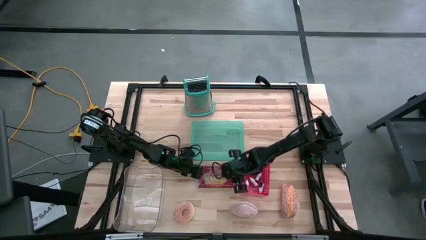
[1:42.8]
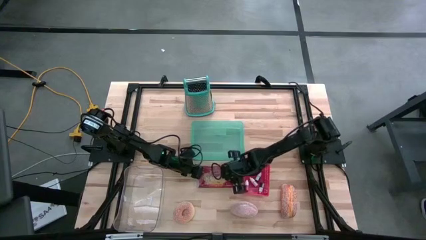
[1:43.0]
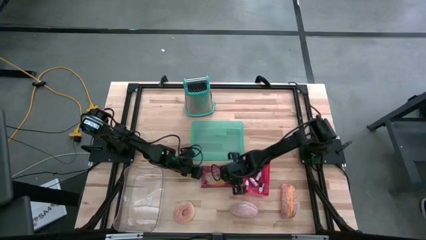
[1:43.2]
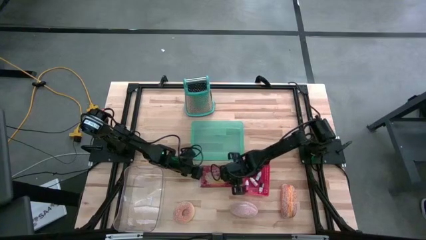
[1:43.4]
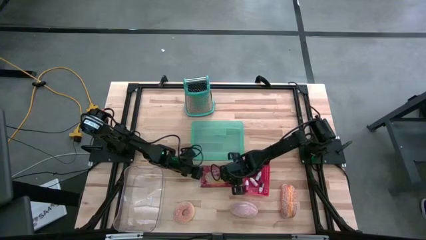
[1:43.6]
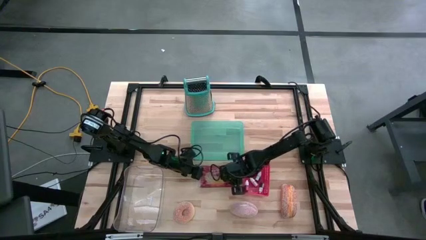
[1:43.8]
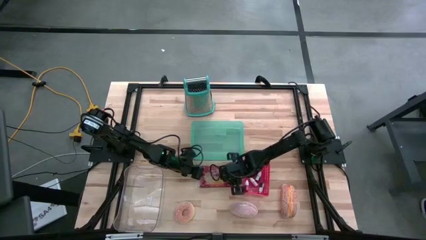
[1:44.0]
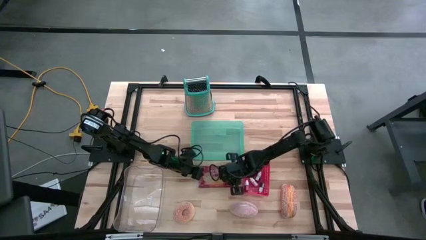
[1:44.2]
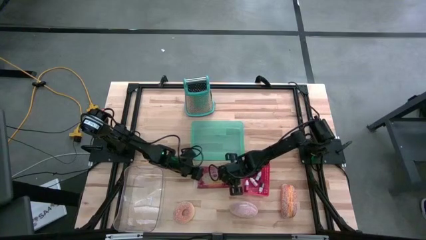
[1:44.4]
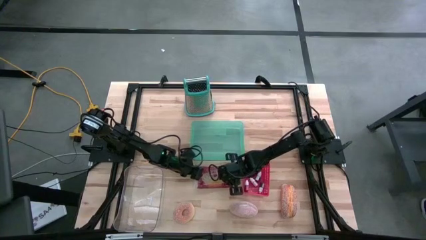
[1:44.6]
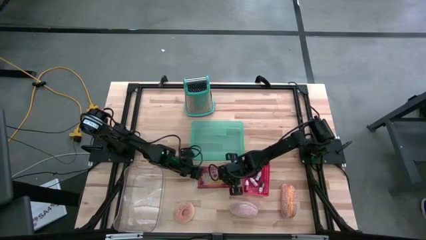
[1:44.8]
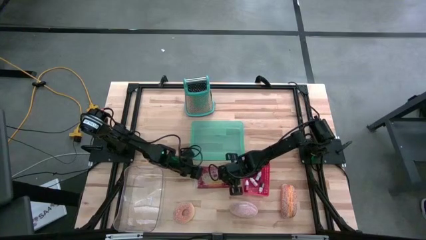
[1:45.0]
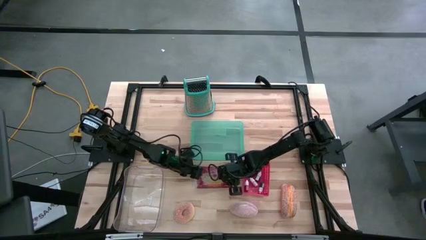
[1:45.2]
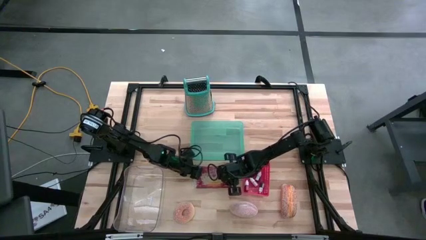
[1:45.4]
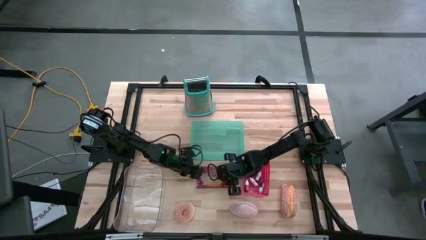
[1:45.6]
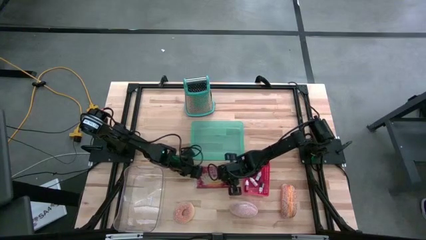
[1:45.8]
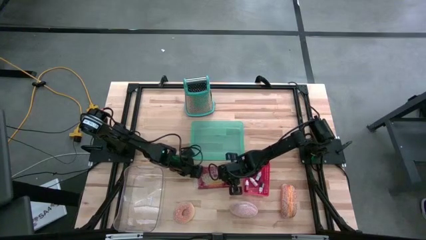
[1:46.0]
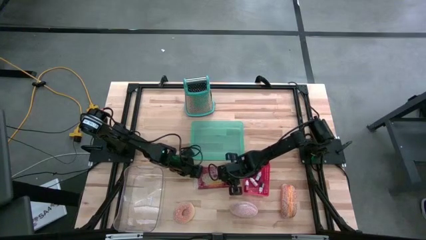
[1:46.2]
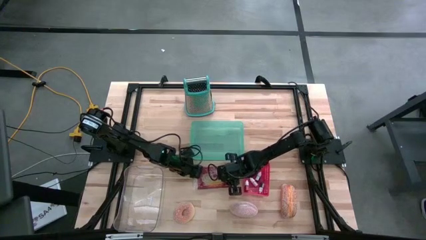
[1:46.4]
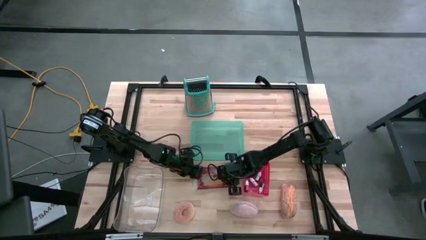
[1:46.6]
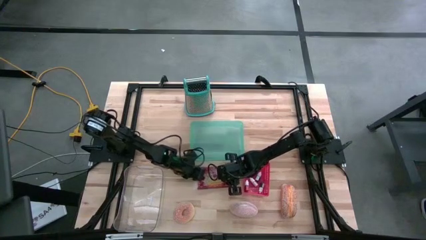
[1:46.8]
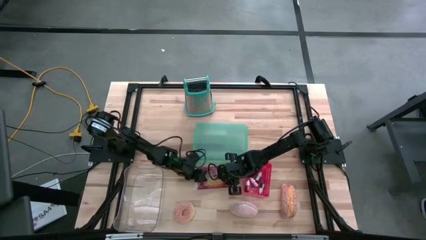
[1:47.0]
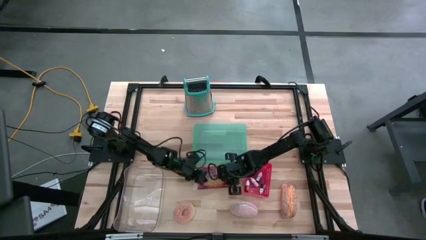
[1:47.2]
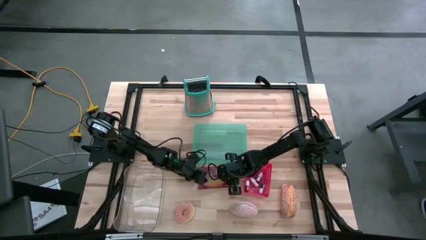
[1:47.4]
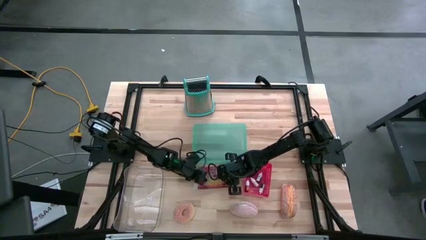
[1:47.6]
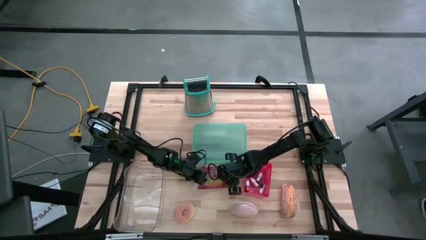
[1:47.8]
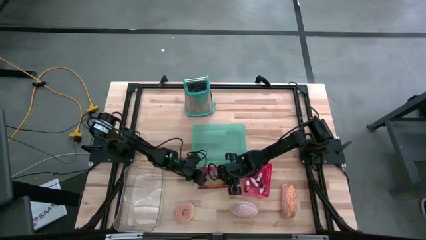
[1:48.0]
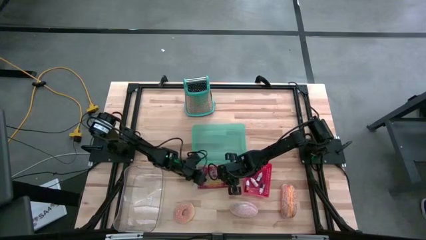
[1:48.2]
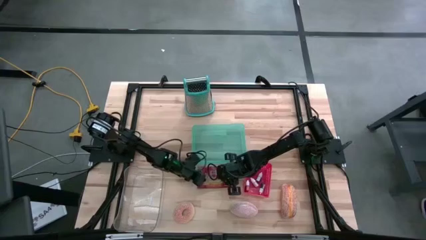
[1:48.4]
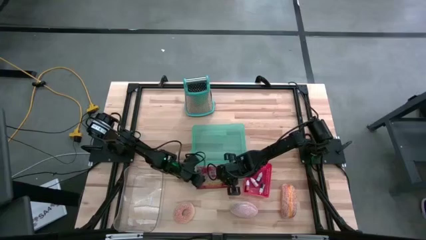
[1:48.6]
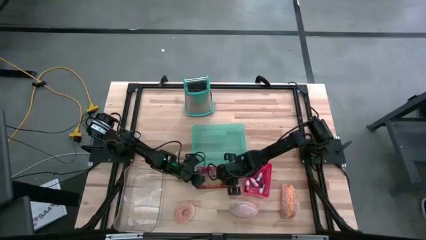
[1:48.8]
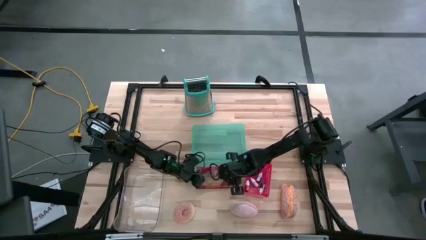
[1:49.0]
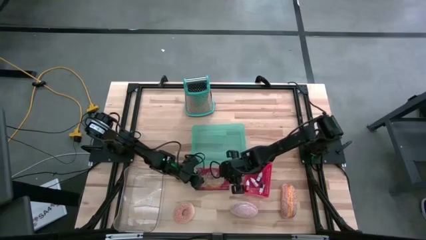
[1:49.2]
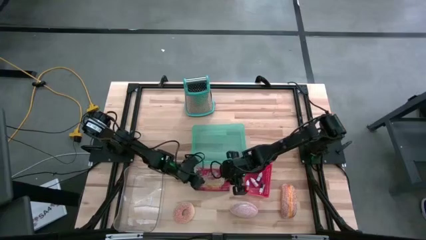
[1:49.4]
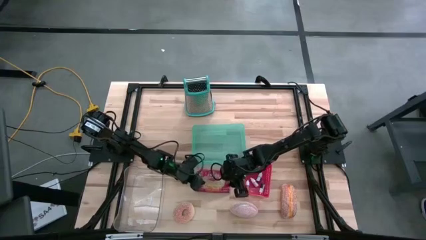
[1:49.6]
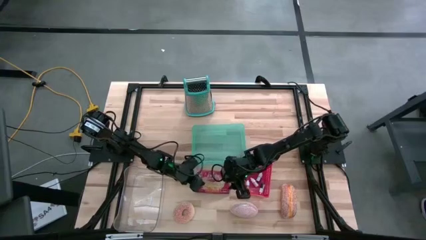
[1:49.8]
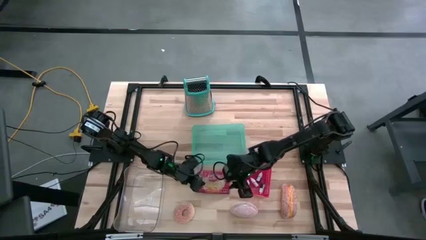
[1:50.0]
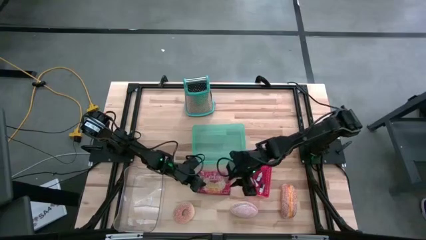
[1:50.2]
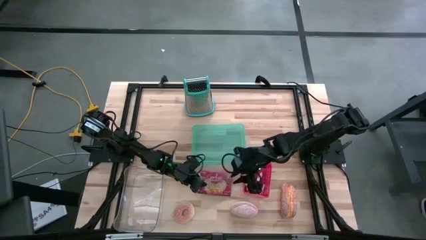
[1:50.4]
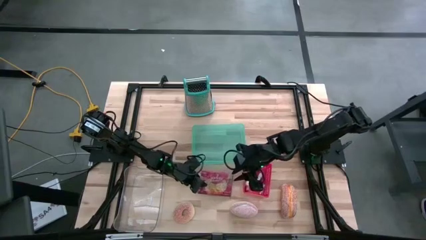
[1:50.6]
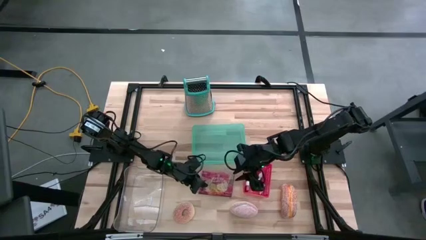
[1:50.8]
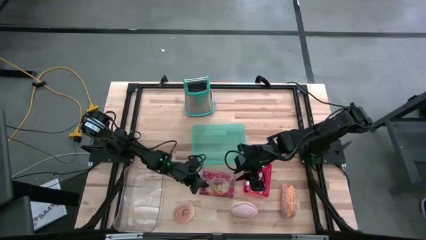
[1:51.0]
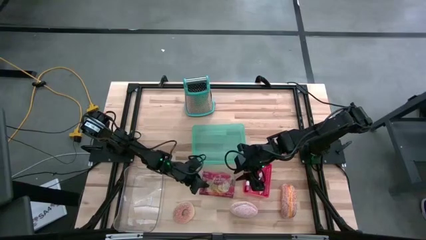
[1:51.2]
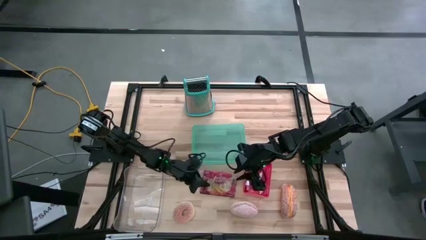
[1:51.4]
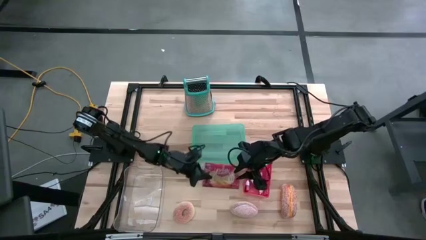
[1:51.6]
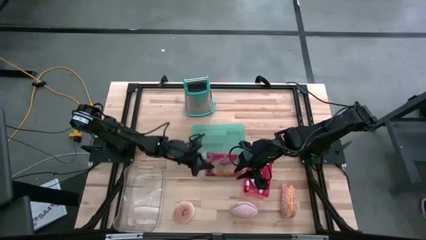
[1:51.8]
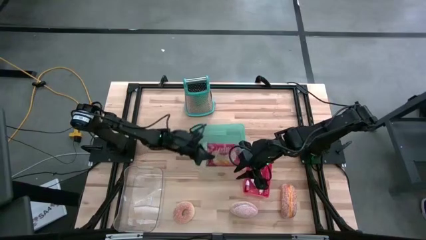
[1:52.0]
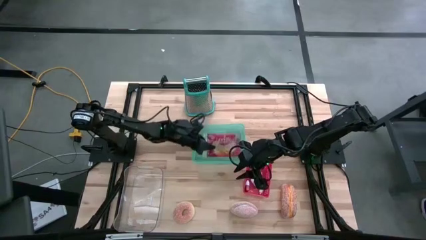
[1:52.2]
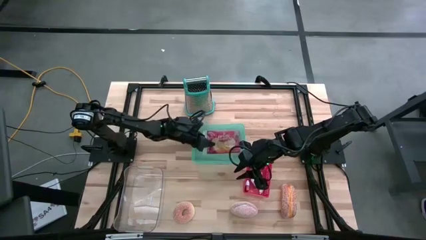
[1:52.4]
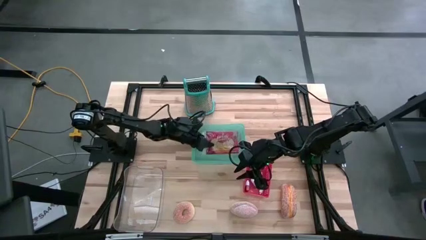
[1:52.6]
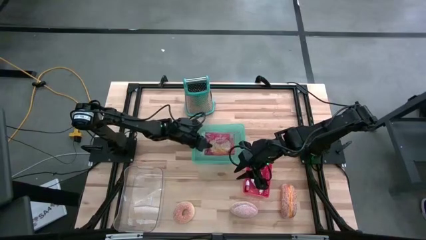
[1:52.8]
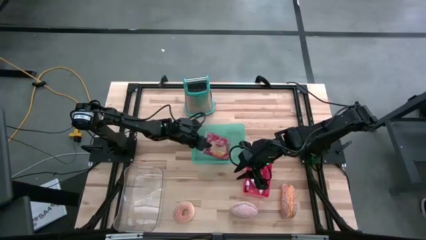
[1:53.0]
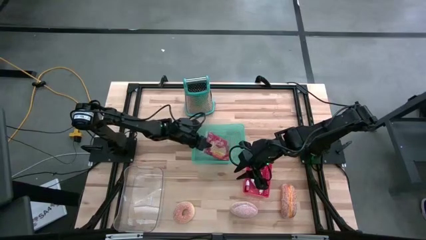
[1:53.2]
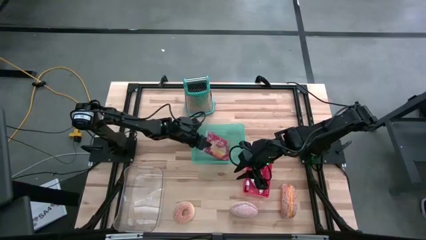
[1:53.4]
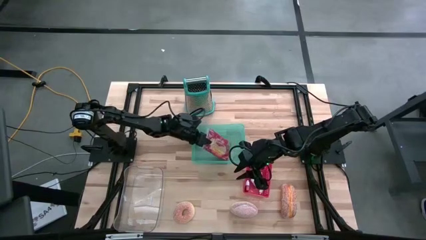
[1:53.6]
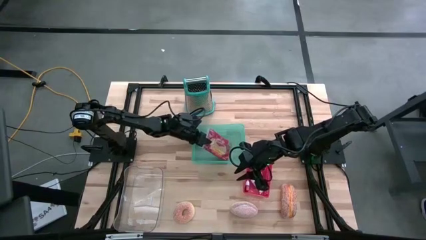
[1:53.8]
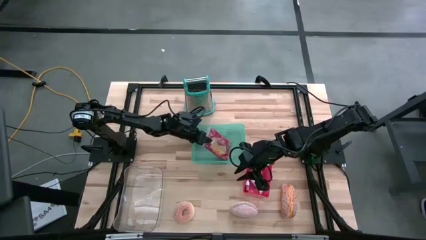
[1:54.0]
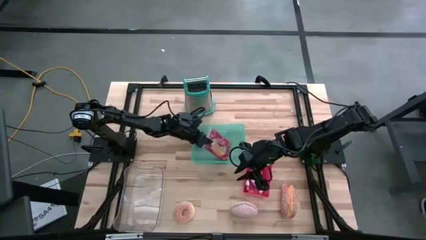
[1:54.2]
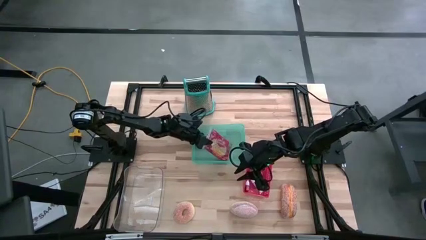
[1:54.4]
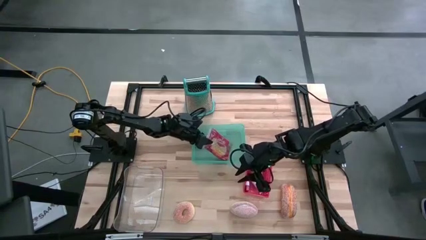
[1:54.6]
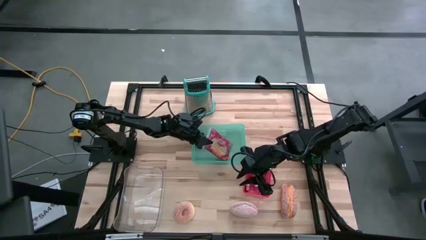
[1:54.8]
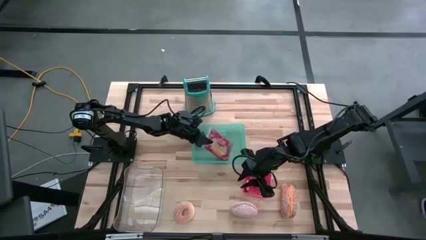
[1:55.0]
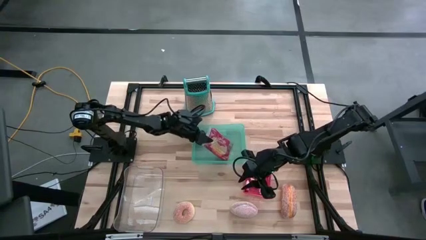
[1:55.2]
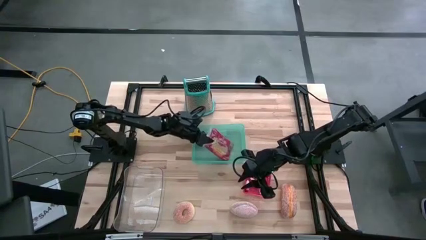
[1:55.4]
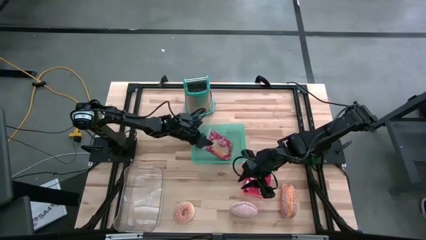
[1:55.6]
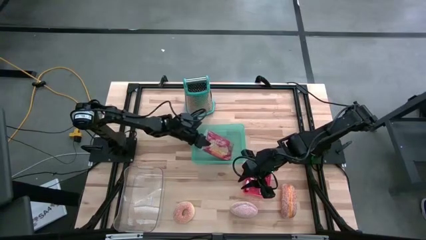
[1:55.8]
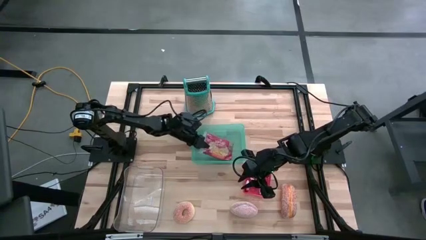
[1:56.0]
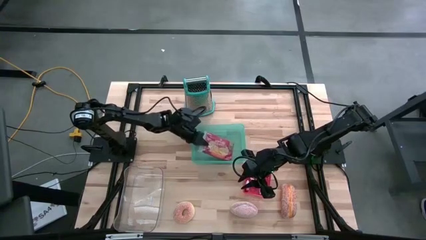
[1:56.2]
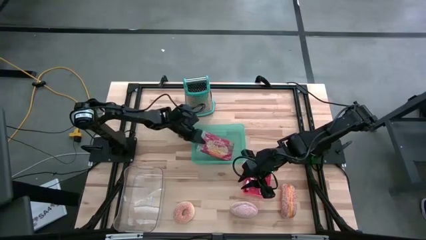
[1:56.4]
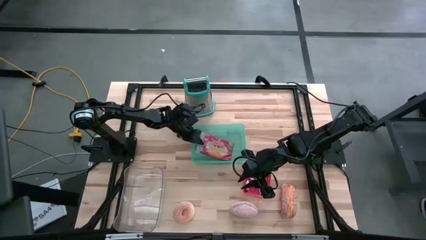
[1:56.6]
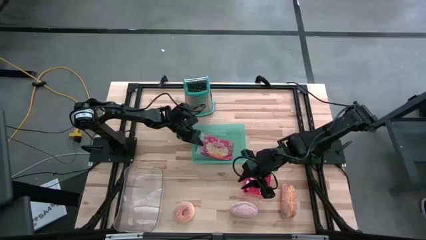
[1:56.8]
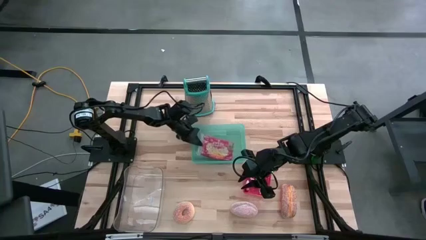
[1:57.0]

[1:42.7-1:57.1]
Task: Pick & Place Food Item
Put the popcorn bag into the green bin

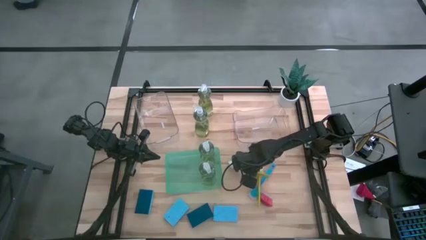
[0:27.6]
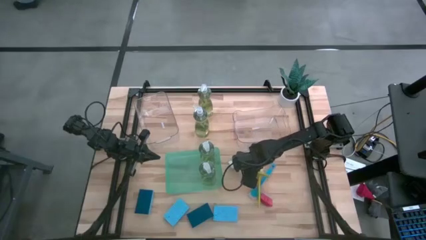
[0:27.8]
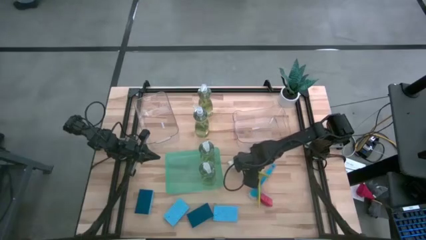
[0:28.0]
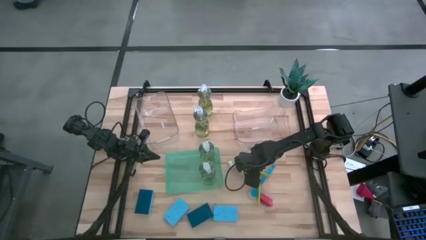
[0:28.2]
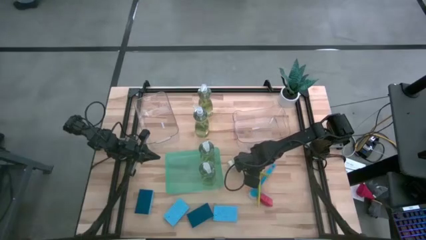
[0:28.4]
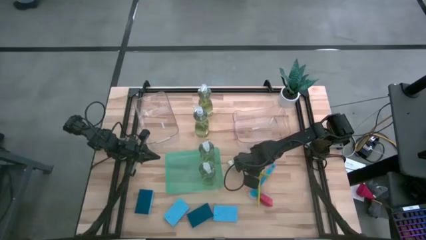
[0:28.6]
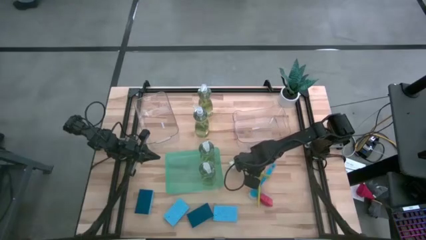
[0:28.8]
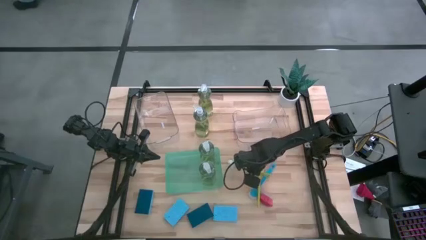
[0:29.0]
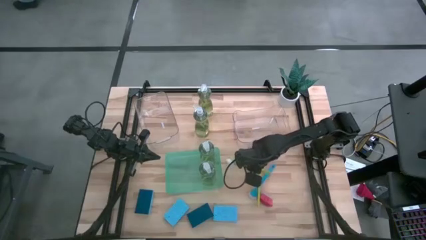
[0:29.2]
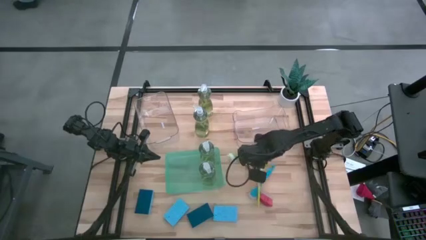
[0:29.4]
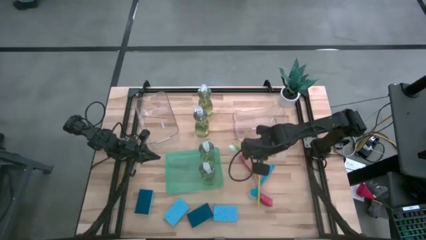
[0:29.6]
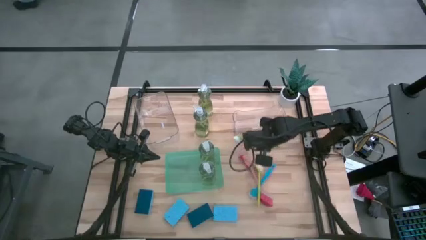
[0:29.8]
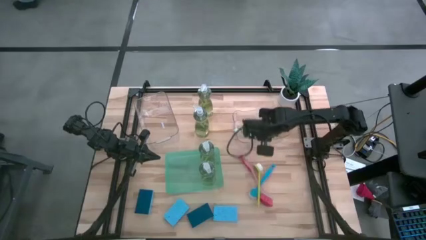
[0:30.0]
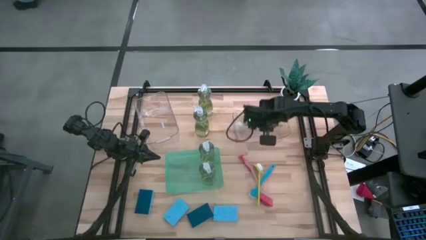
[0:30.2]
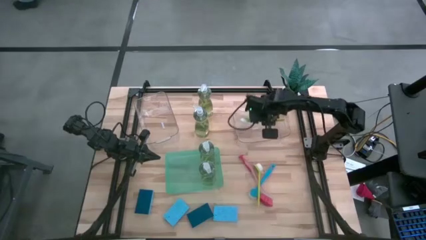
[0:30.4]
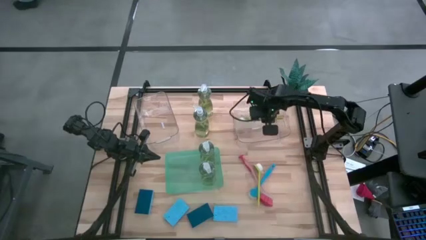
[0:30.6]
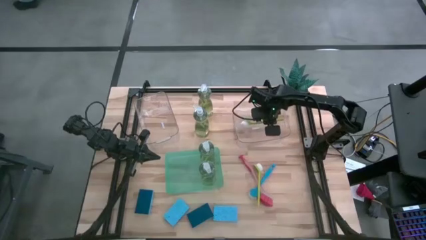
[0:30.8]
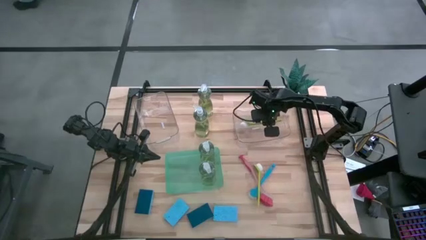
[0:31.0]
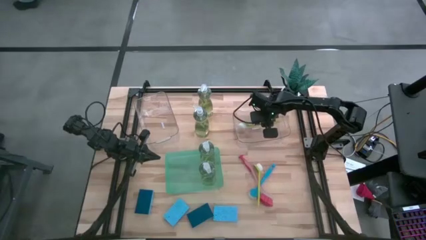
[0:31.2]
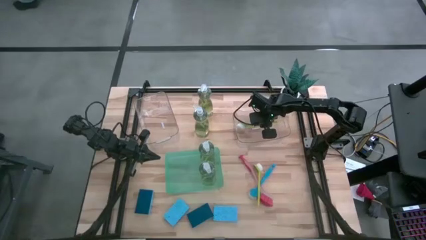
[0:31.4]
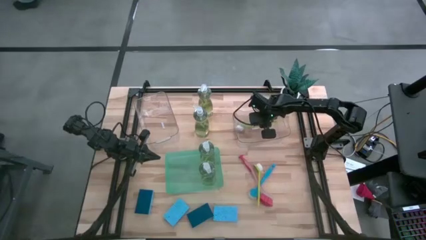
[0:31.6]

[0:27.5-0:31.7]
Task: Pick & Place Kitchen Sink Supplies
Put the yellow dish brush into the right transparent bin
